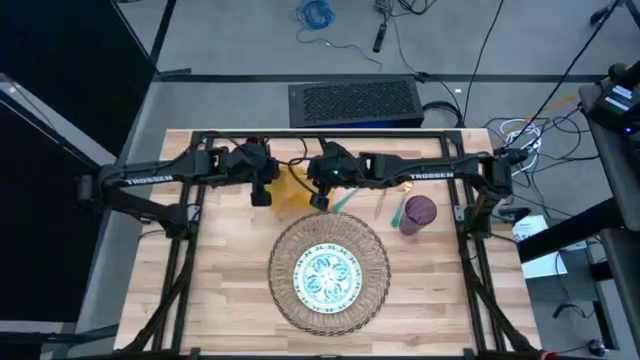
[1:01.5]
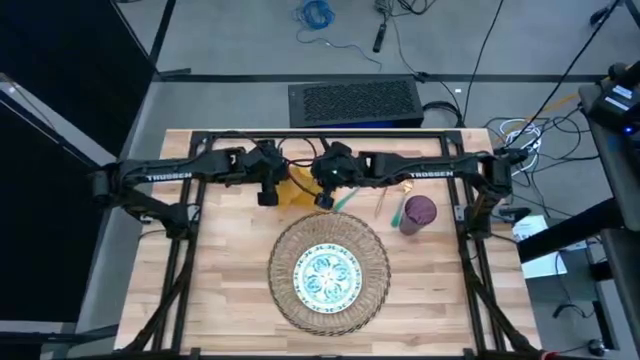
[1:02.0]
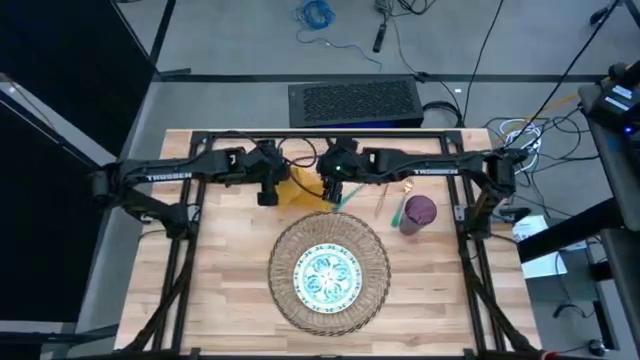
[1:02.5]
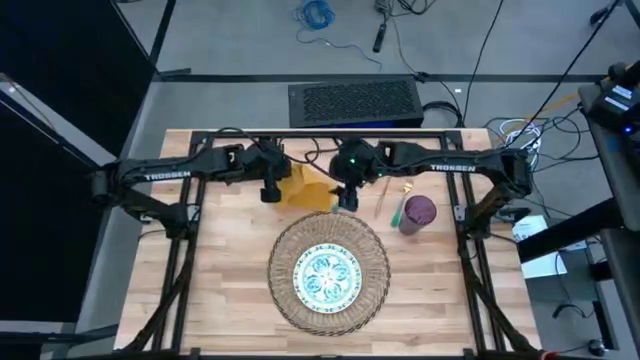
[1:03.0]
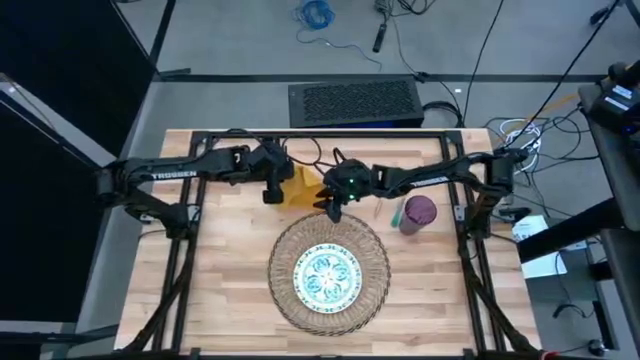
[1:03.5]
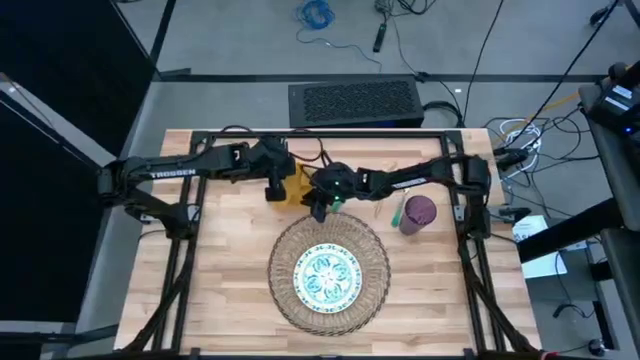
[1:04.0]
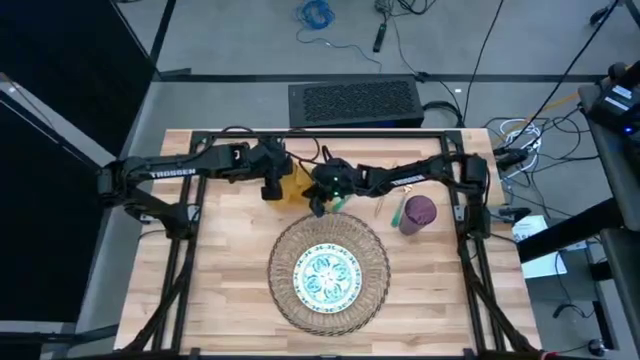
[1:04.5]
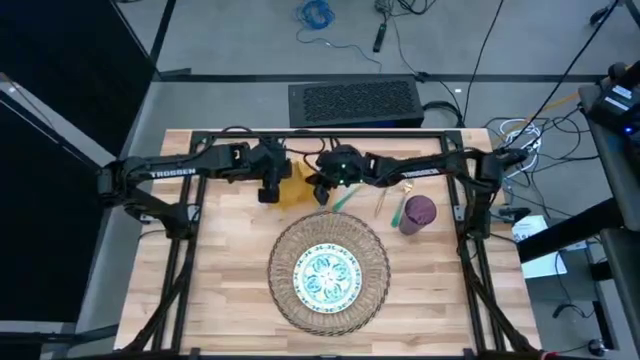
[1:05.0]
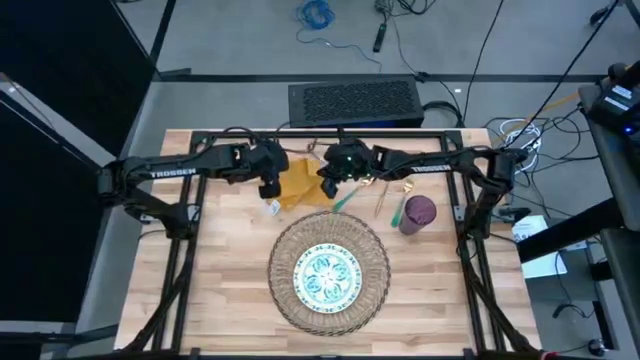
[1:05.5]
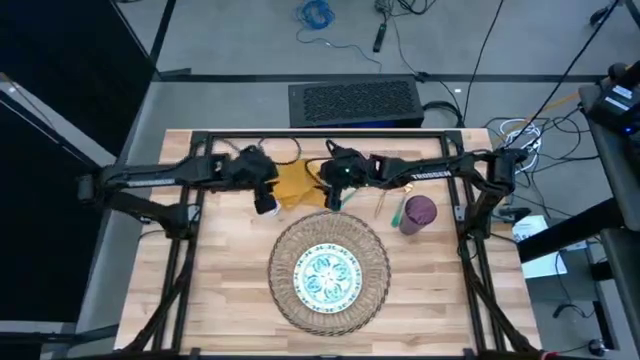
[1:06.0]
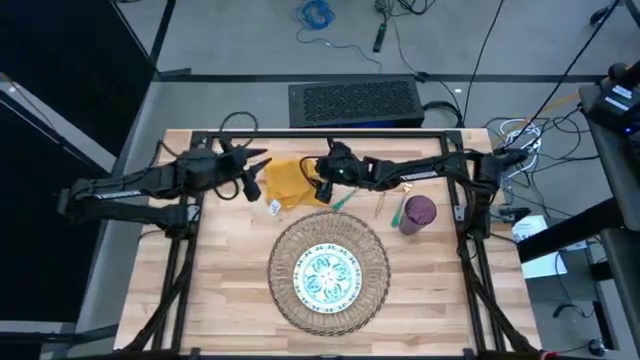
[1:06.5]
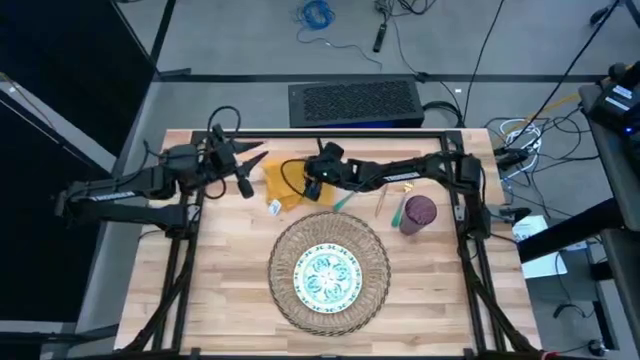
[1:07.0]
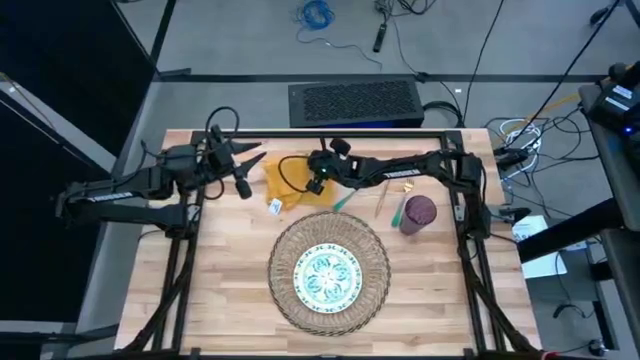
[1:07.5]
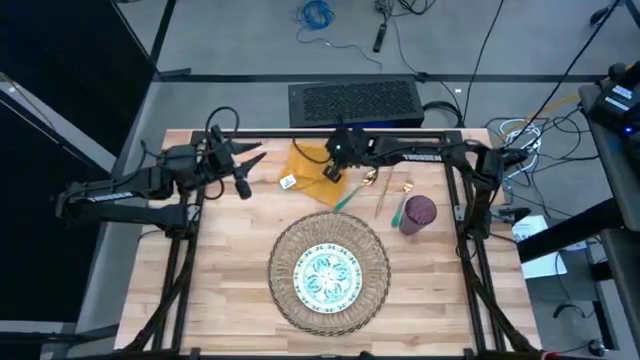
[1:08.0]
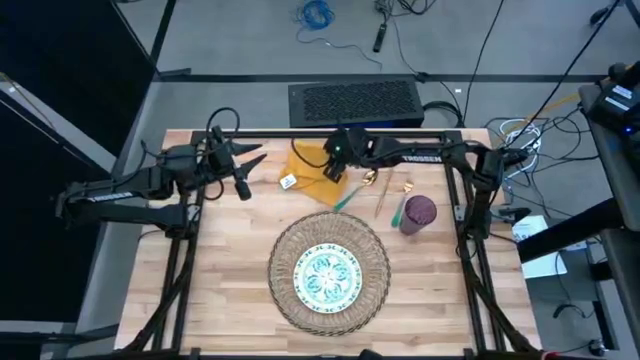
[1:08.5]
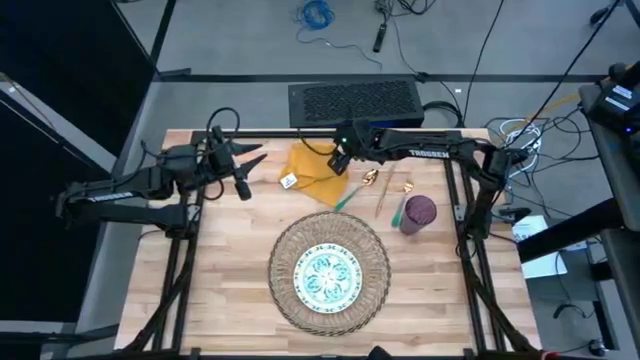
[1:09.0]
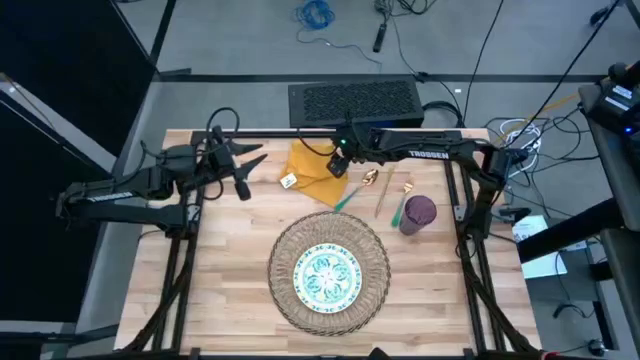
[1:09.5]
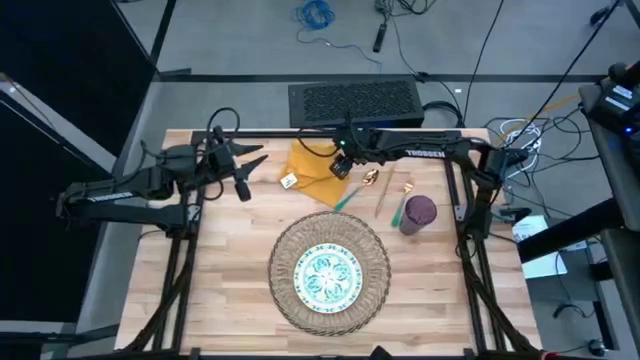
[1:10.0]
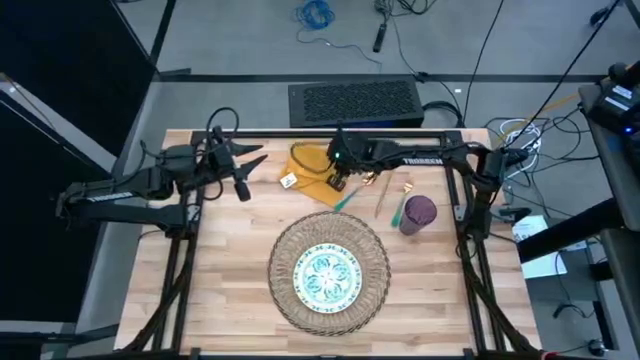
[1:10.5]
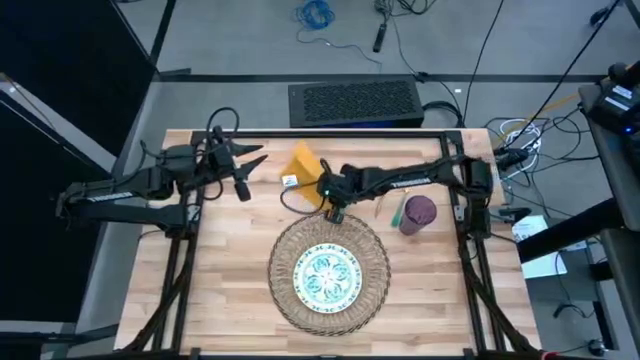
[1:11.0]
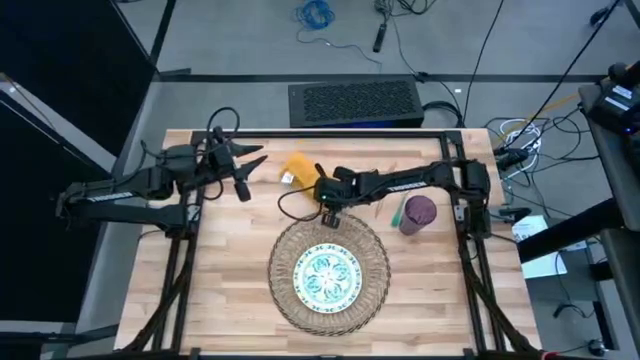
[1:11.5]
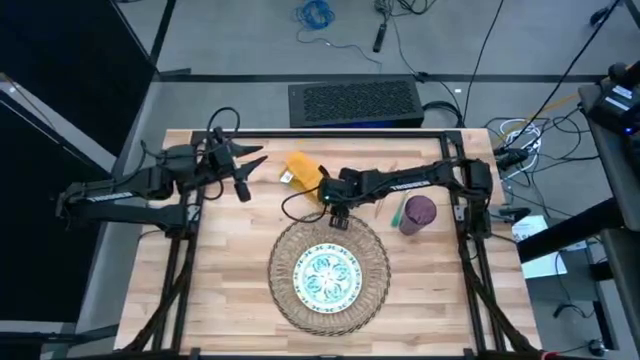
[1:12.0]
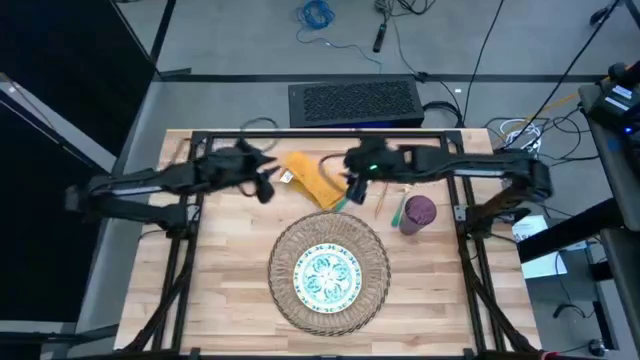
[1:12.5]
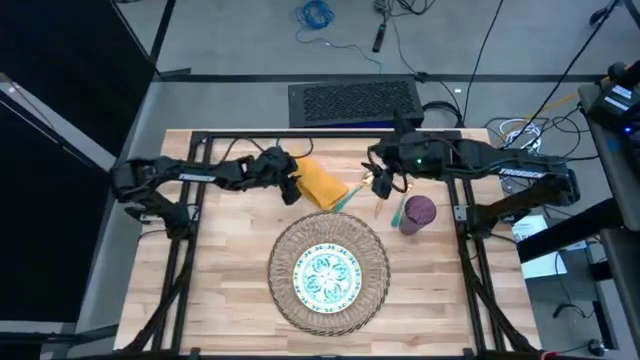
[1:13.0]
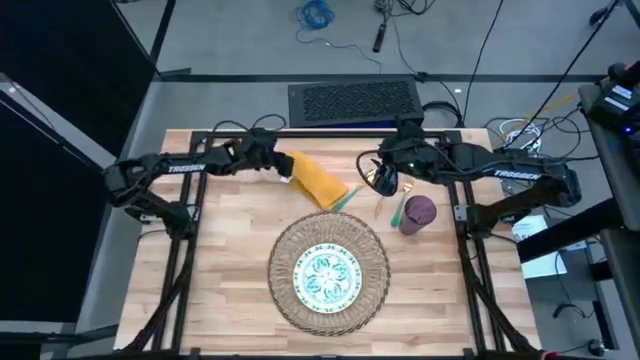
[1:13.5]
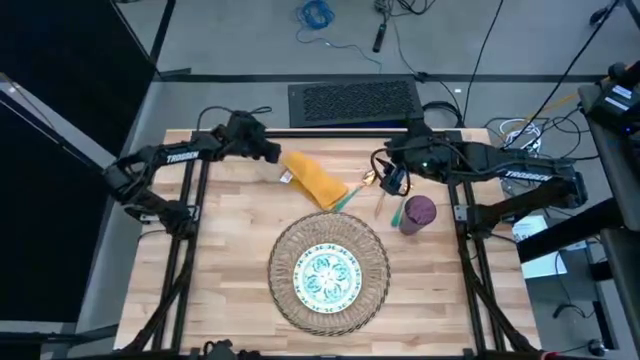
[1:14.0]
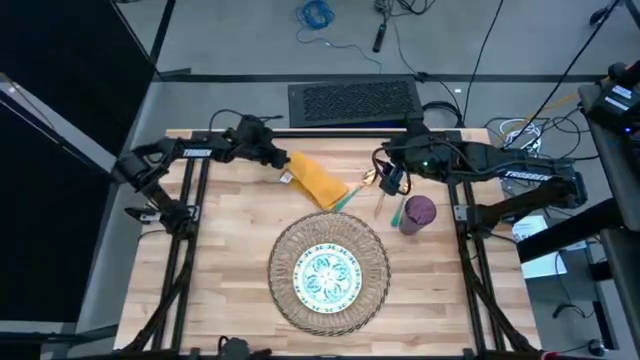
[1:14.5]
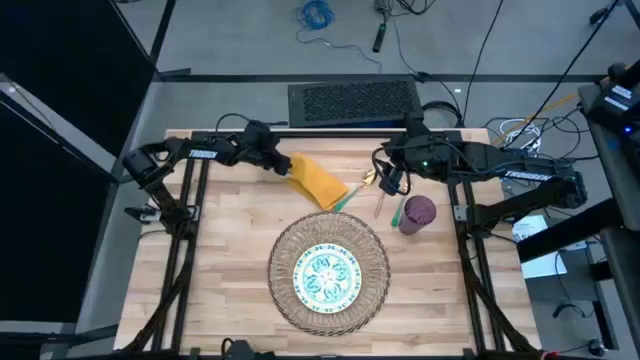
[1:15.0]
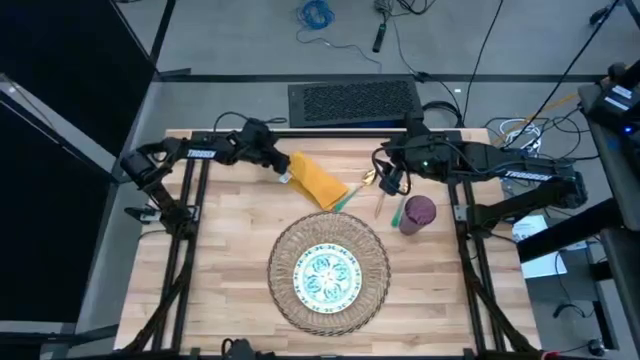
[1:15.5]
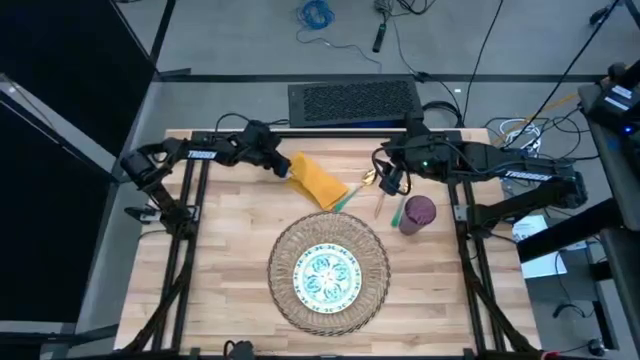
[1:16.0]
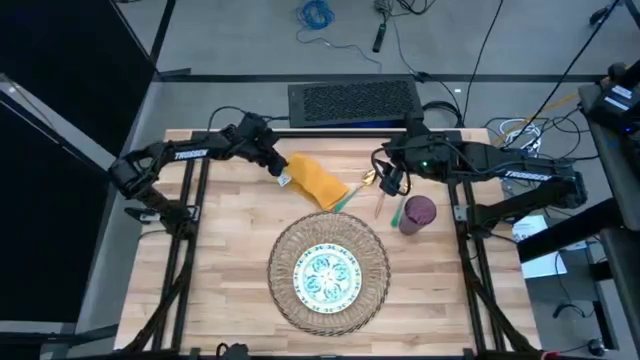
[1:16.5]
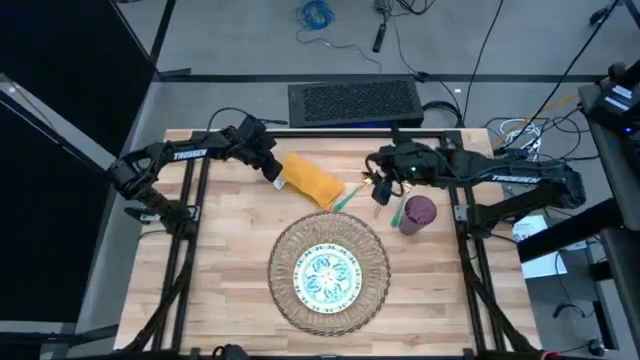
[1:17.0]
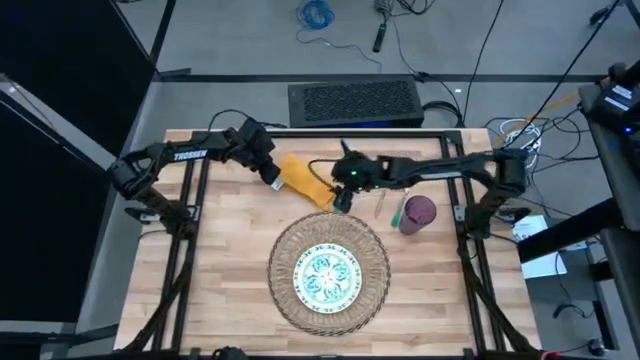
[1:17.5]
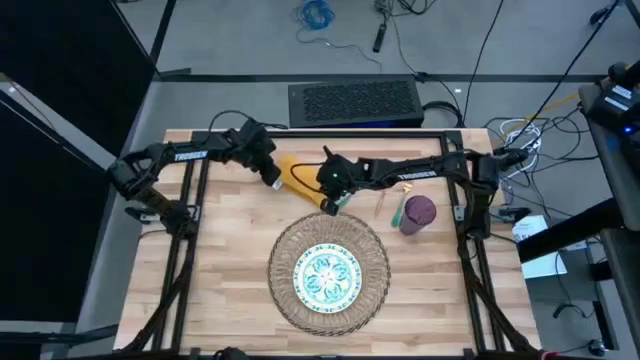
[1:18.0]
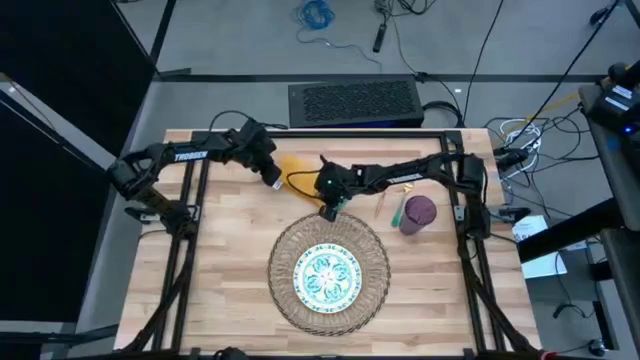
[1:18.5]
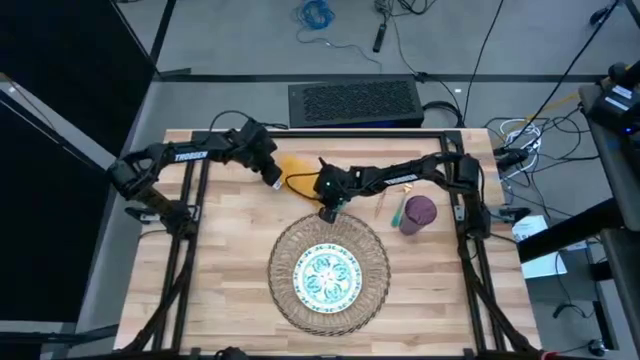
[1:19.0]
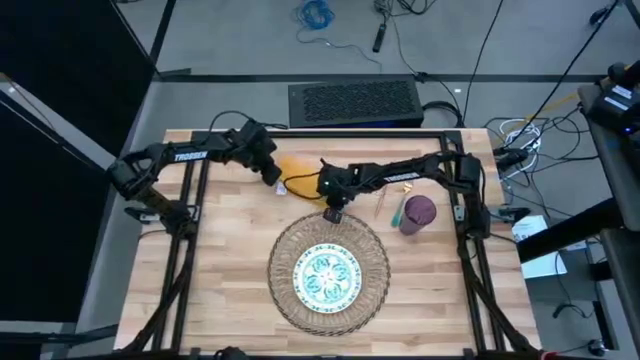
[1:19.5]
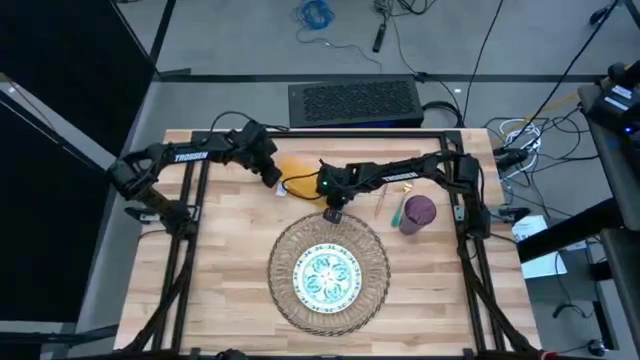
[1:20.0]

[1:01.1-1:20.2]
Task: Set table place
Fold the yellow table napkin
